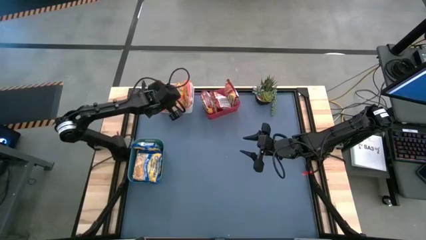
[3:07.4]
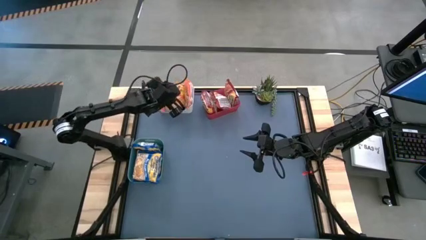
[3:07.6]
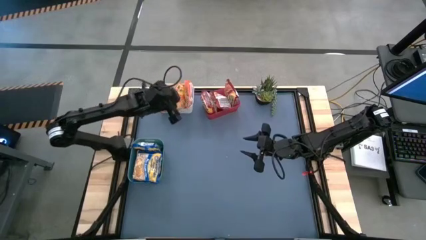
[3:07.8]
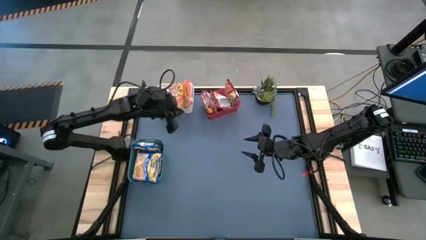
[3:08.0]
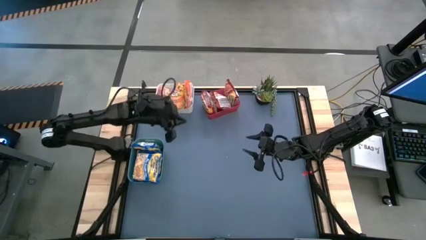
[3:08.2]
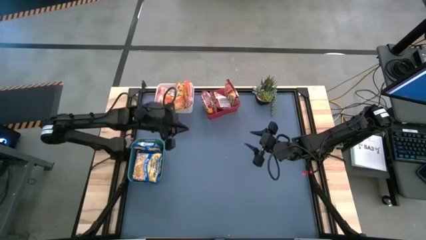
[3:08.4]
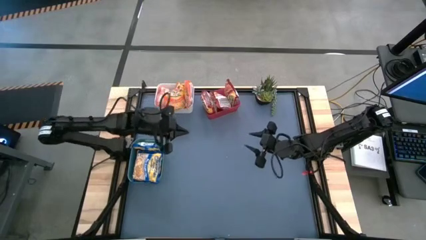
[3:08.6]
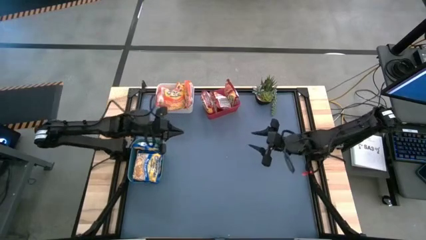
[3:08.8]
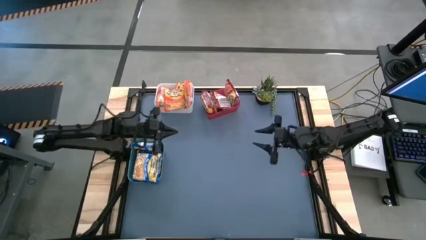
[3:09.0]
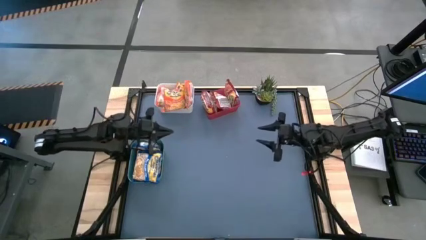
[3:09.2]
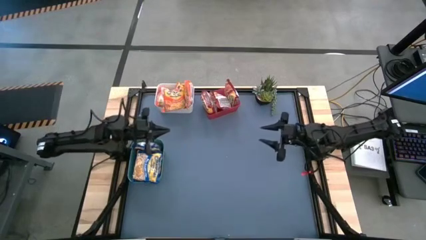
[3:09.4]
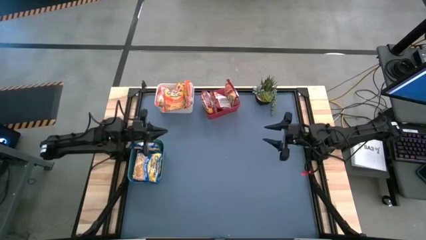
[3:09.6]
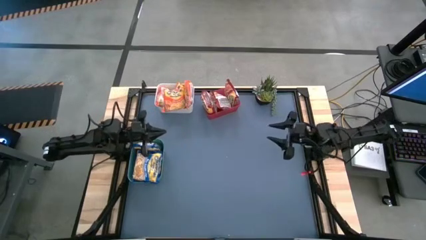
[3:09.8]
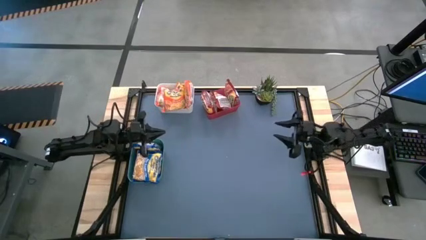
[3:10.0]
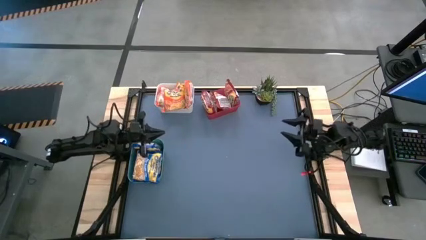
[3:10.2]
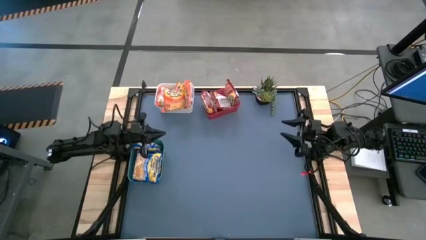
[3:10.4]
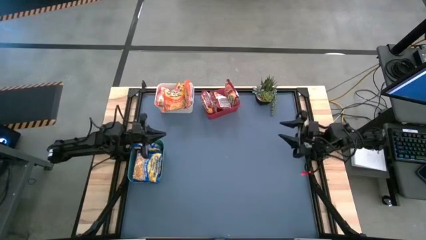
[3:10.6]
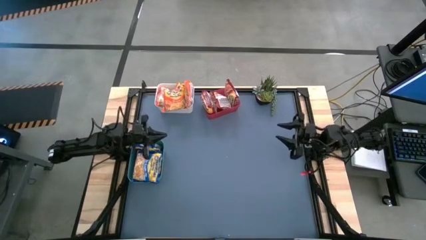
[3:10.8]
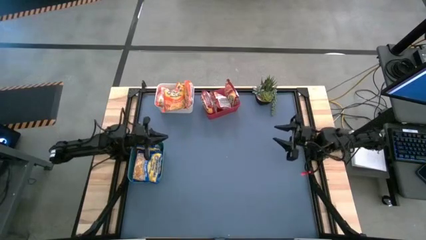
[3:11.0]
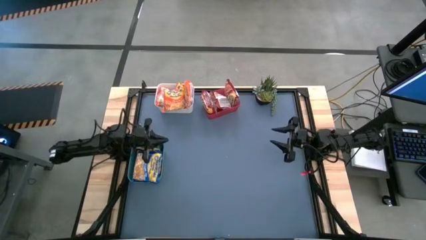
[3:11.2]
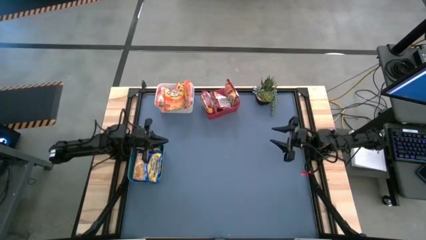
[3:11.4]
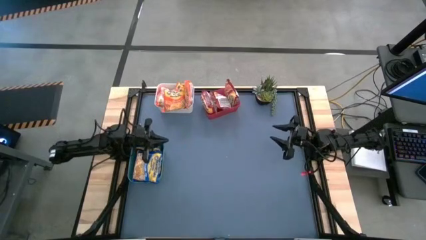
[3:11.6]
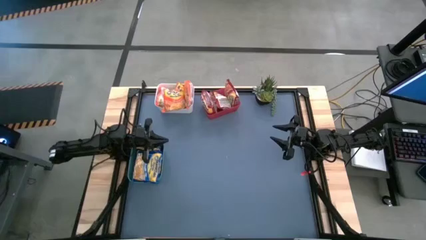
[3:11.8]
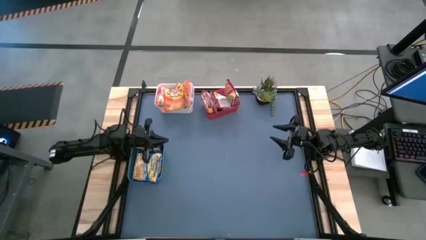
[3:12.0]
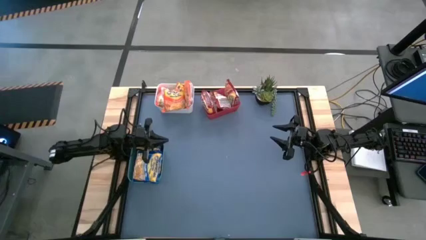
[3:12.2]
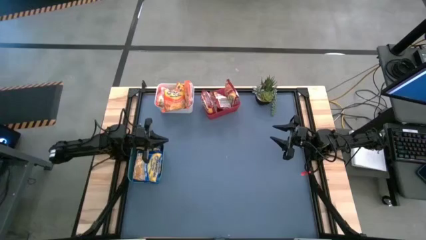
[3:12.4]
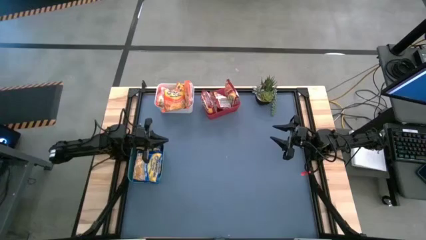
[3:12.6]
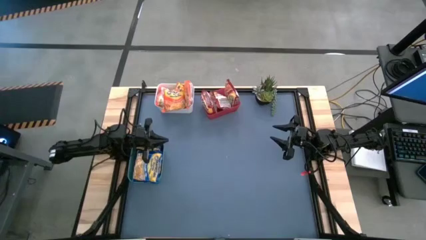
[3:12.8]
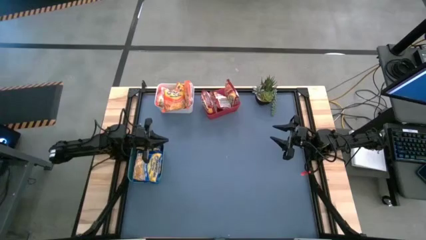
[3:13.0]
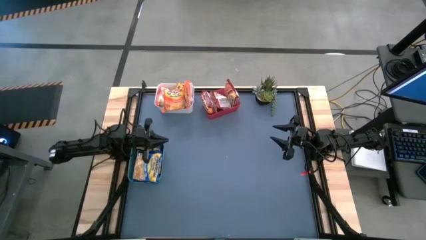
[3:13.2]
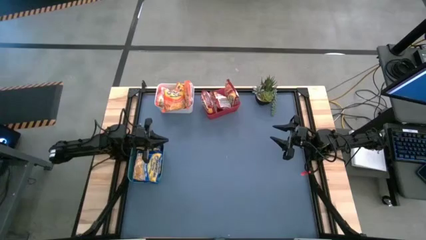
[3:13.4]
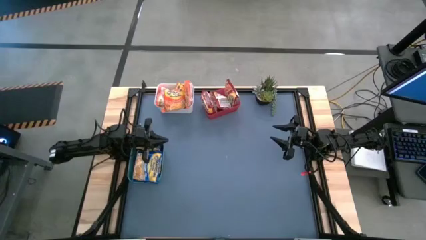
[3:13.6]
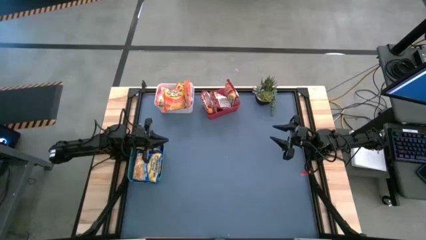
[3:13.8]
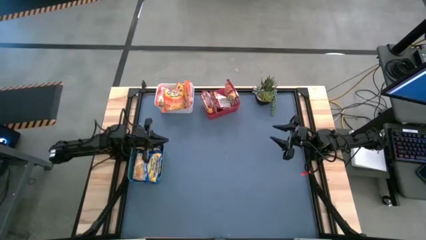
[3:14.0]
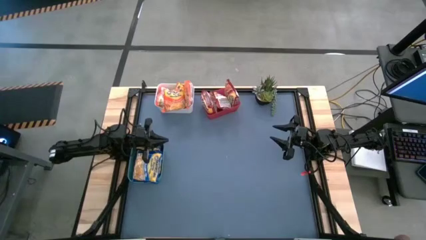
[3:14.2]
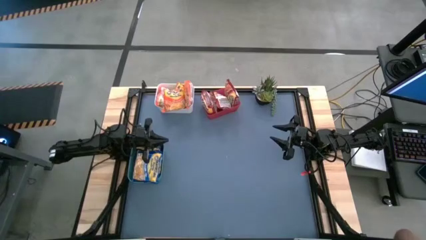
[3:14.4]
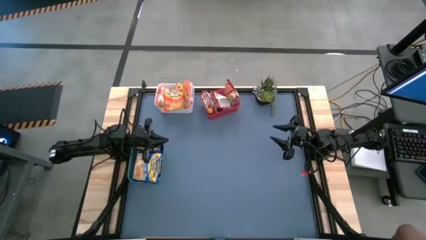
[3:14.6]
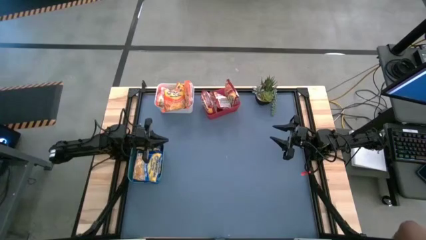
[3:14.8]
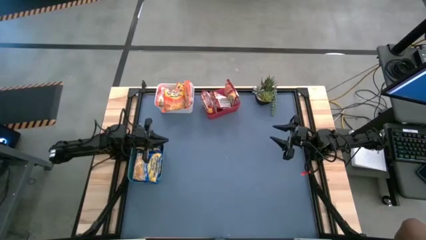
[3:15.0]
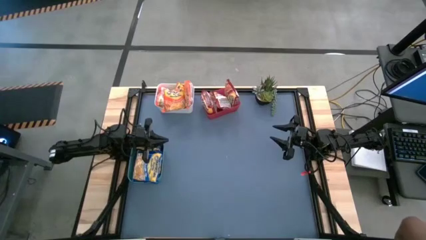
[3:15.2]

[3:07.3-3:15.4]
Task: Sort Maruchan noodles
Return to Home Position
